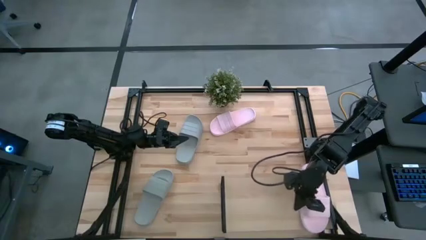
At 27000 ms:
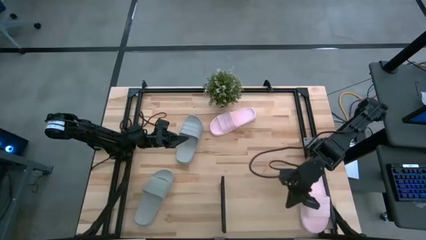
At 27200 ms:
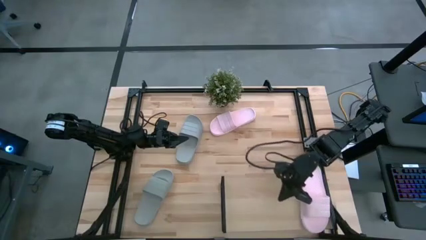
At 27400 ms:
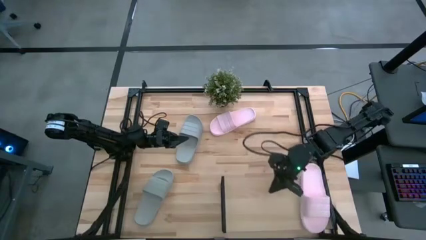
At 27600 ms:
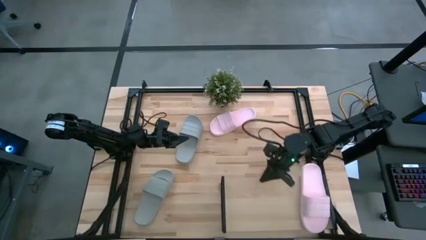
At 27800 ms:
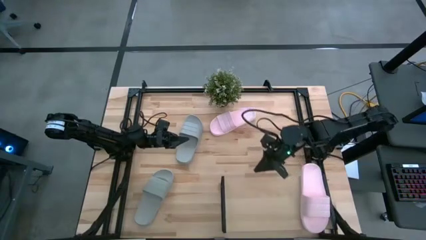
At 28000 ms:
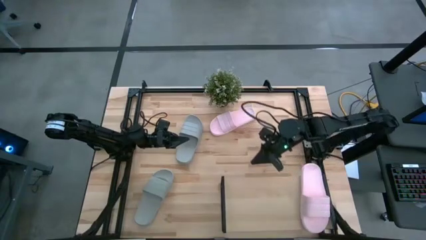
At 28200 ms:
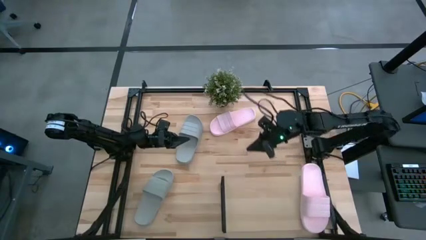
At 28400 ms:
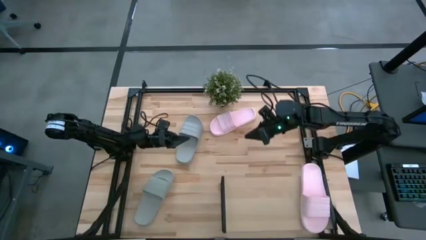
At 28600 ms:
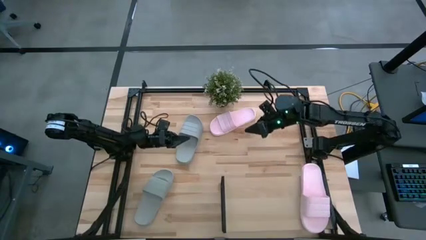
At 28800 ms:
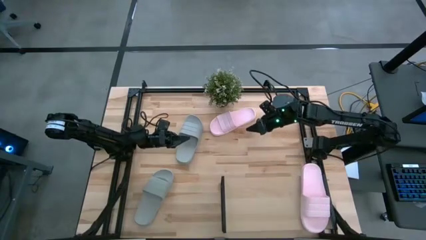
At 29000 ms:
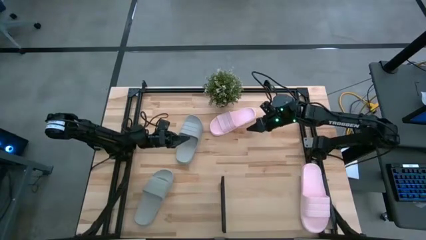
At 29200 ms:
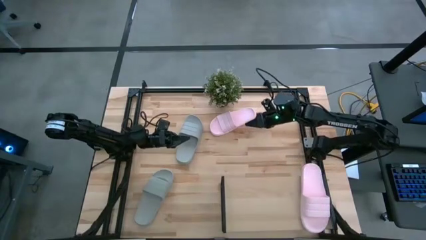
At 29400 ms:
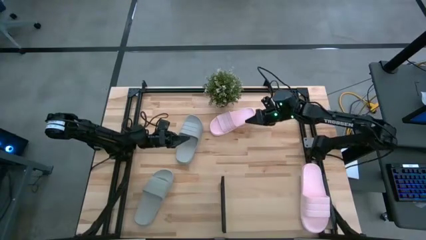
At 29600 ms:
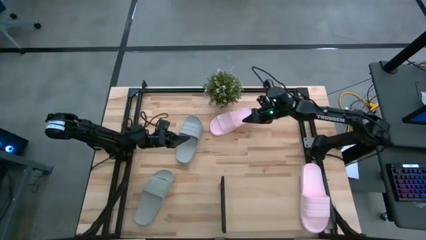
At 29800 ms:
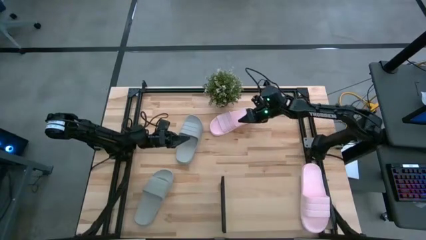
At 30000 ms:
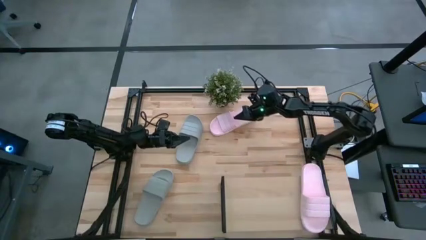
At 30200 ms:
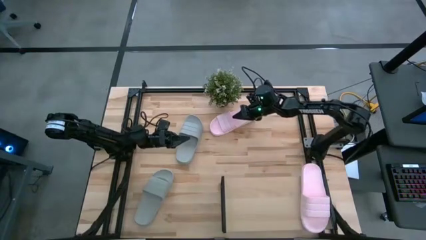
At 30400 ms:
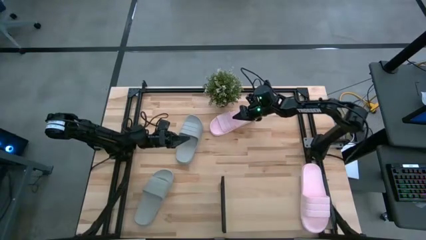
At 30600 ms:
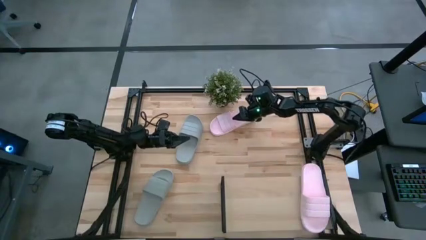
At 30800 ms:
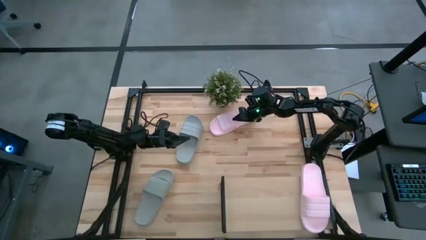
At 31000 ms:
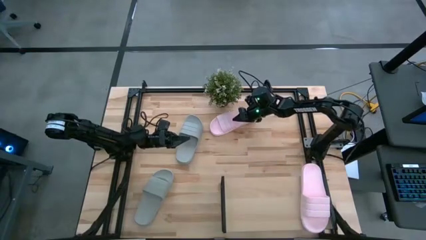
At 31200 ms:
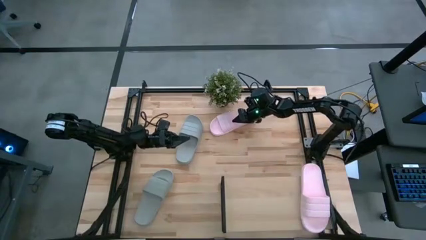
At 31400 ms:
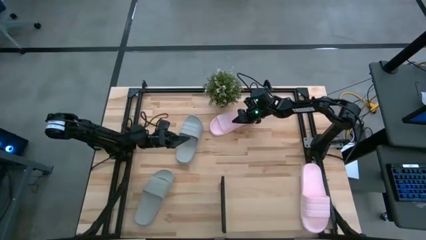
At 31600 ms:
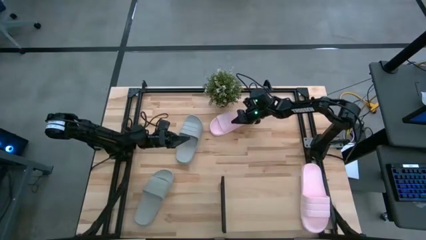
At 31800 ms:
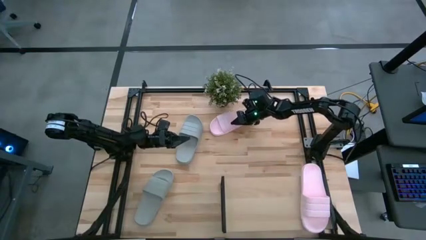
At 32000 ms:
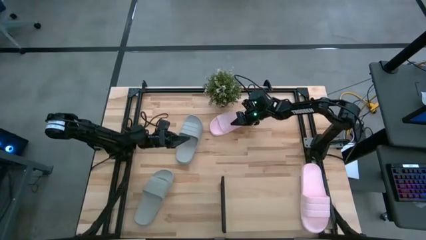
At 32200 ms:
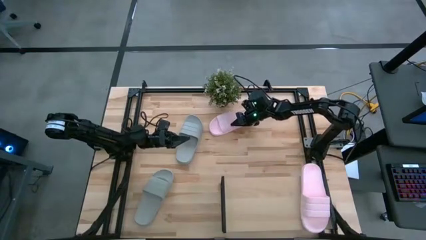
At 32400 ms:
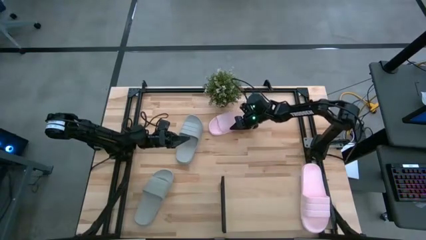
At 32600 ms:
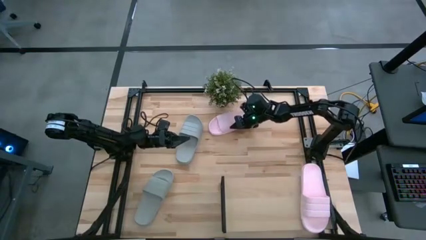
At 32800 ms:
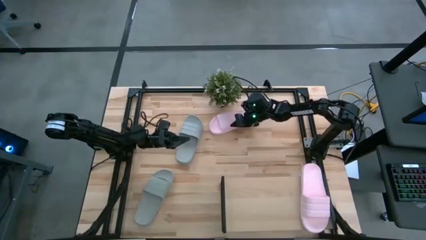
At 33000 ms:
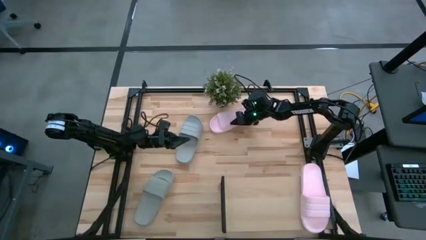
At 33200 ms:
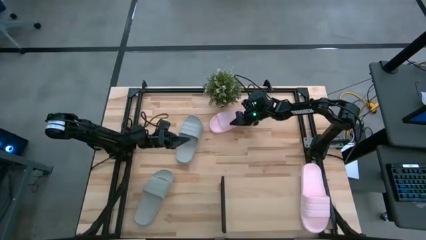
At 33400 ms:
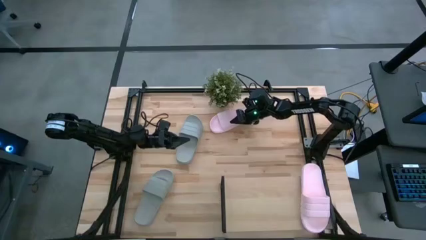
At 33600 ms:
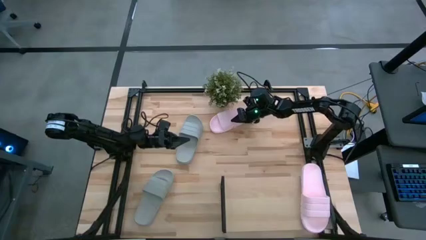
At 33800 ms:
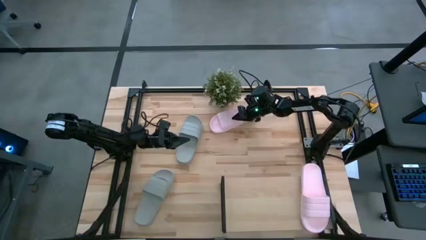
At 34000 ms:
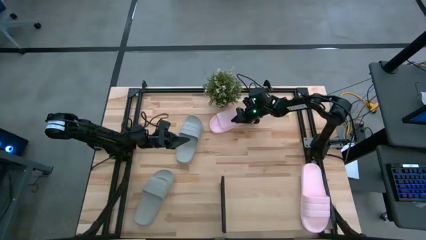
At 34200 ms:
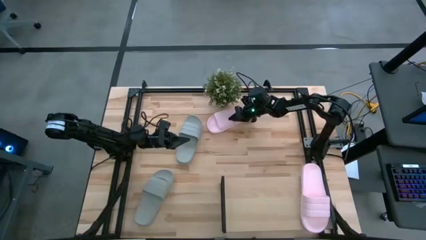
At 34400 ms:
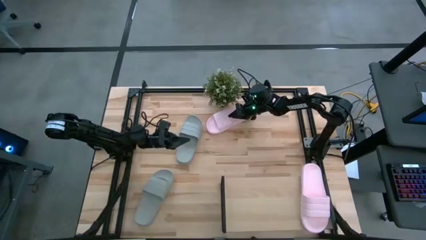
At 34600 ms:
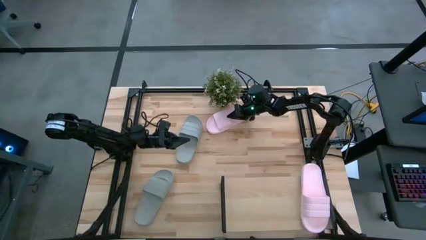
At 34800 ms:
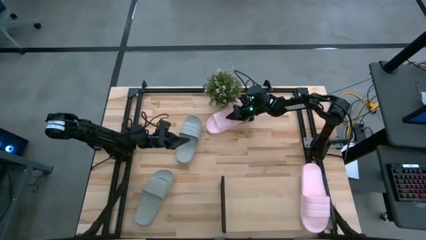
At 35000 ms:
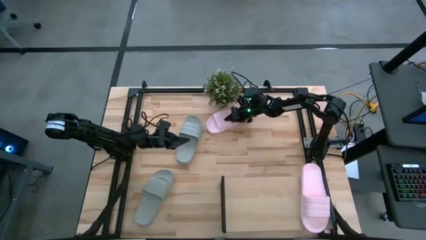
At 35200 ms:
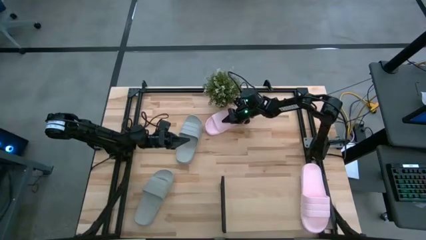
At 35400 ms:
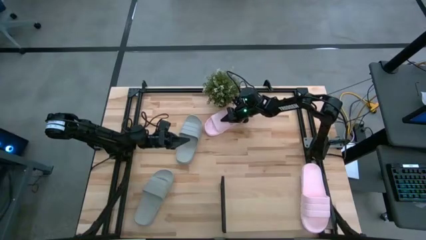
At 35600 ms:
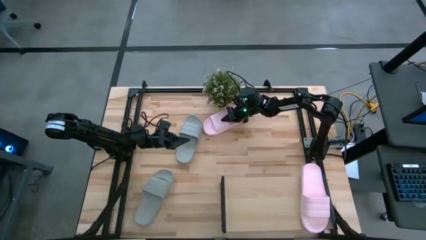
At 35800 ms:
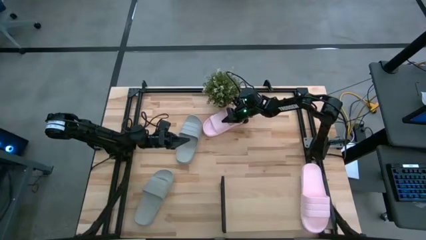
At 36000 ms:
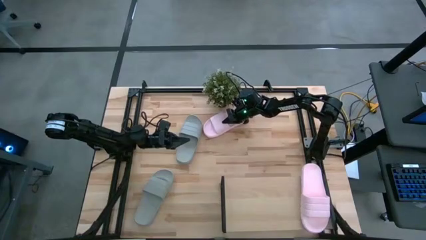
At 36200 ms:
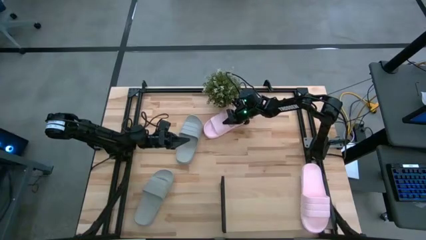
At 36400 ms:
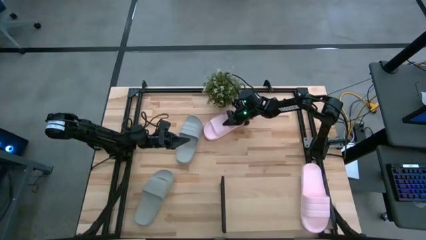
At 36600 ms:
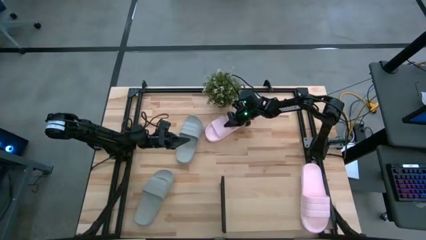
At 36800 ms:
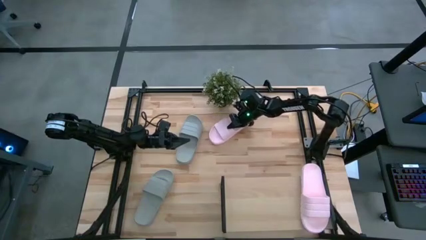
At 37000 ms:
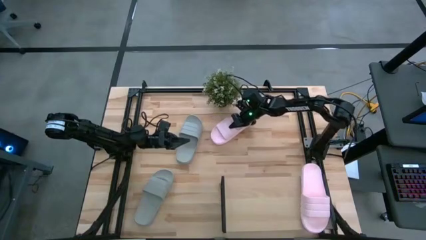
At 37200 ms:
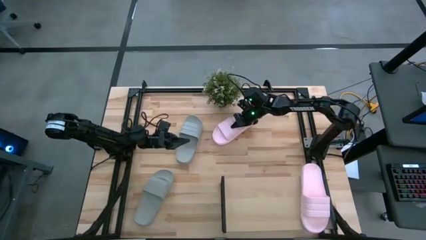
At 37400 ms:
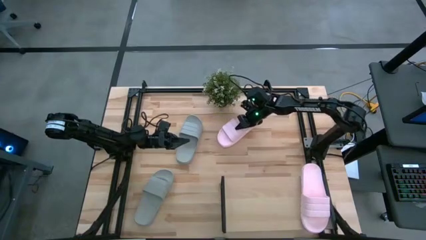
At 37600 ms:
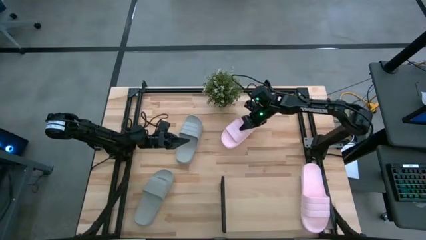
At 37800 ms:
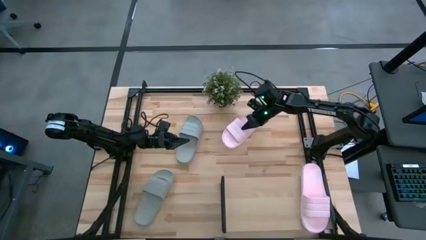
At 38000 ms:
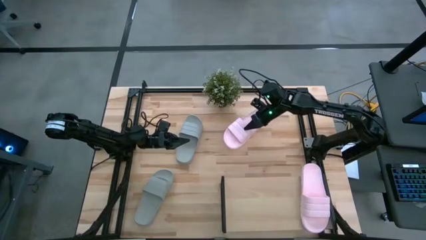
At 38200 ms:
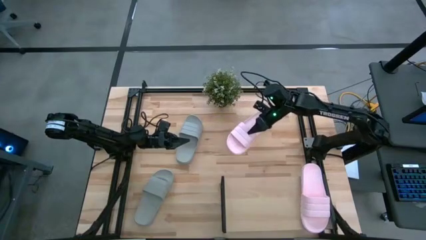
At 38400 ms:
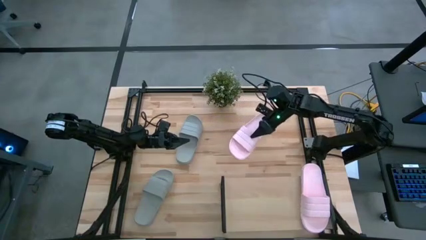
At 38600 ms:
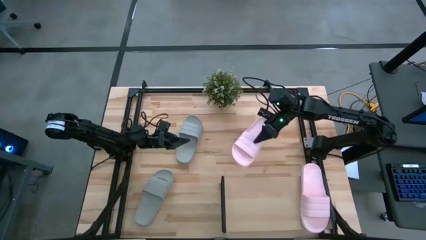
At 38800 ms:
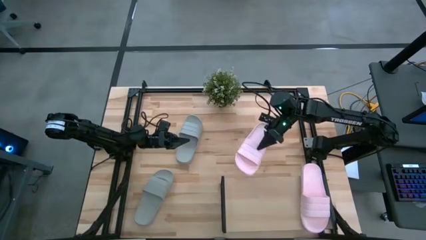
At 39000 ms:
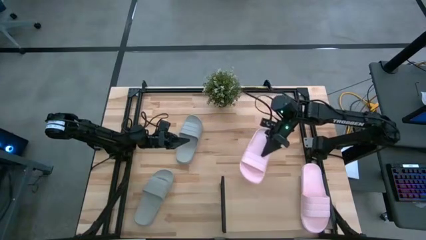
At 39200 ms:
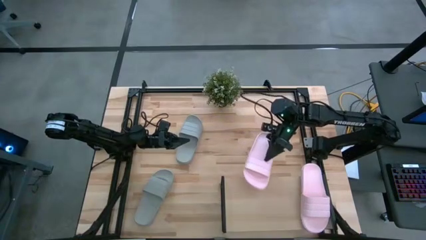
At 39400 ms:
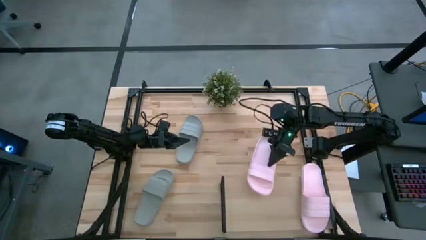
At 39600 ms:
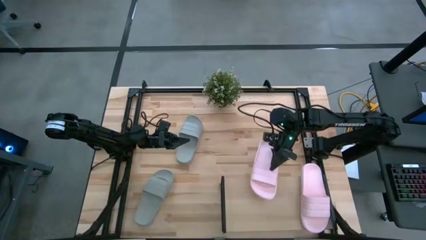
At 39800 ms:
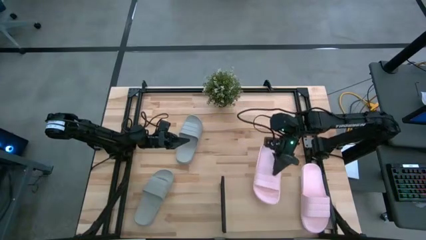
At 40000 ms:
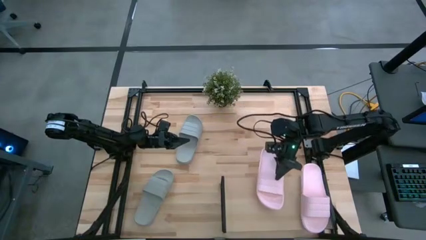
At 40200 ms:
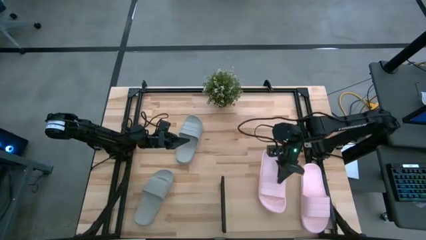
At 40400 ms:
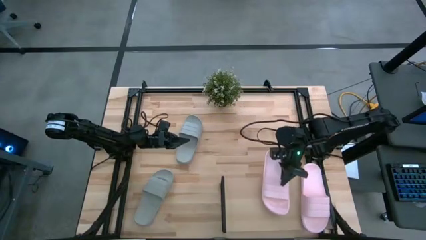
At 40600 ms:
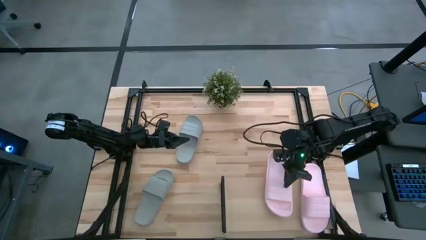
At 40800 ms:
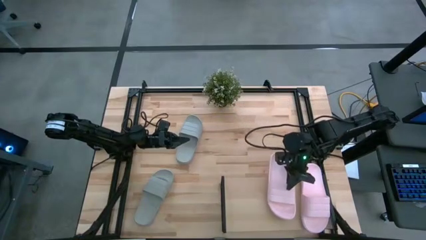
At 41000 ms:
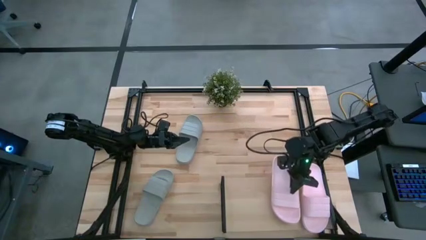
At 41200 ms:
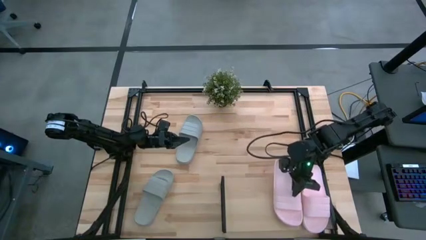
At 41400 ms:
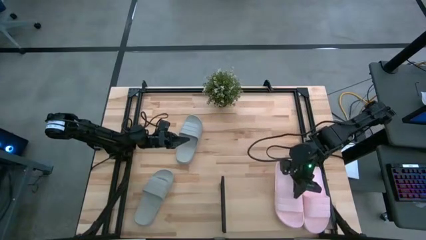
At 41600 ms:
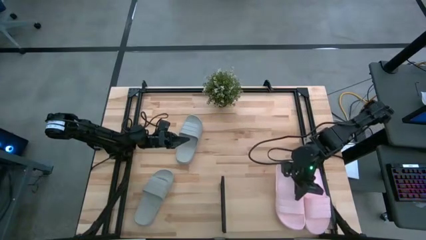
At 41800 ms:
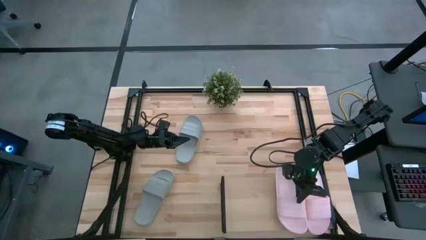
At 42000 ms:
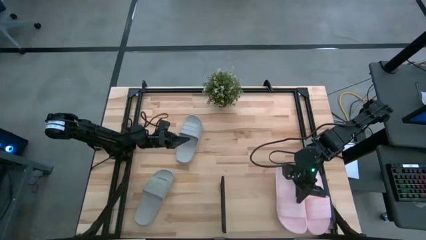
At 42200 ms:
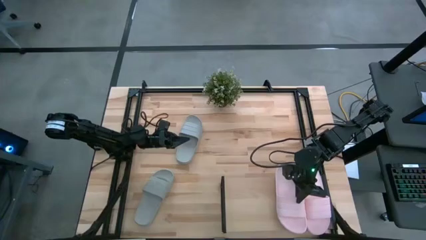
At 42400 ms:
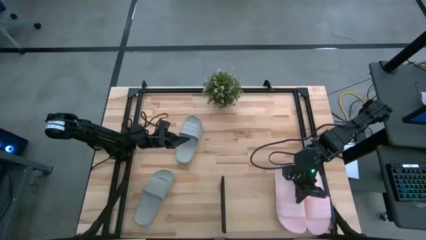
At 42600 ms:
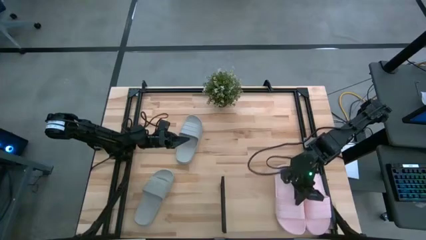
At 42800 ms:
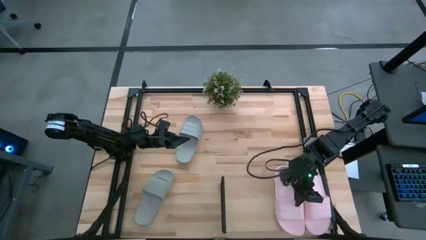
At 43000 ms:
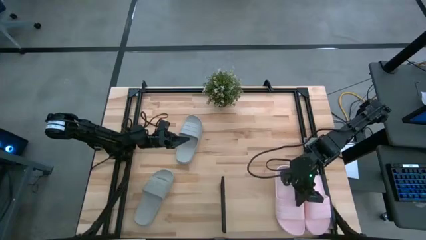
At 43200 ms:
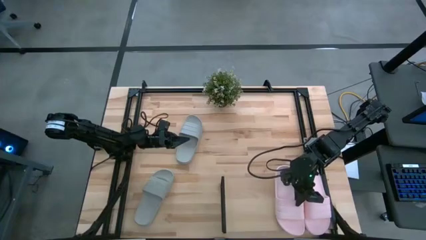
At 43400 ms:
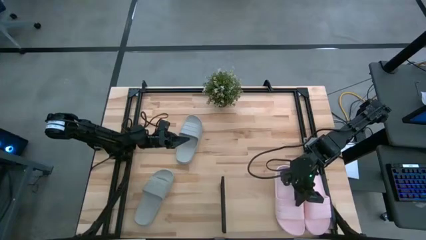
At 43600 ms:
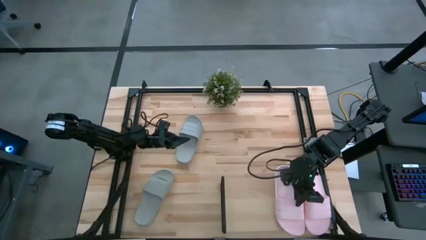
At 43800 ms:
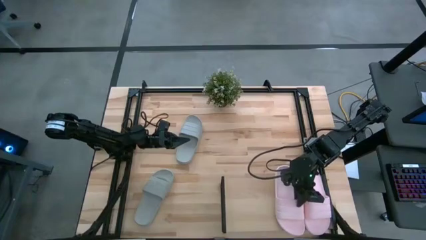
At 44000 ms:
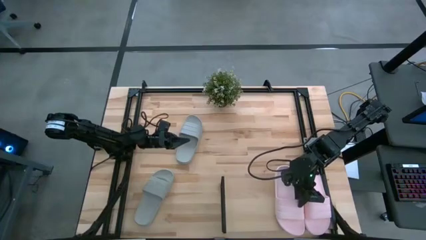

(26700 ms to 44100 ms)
Task: Pick and place slides into the shelf
Put the pink slide on the shelf
